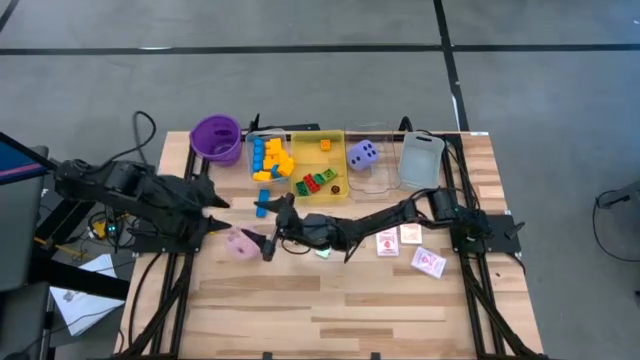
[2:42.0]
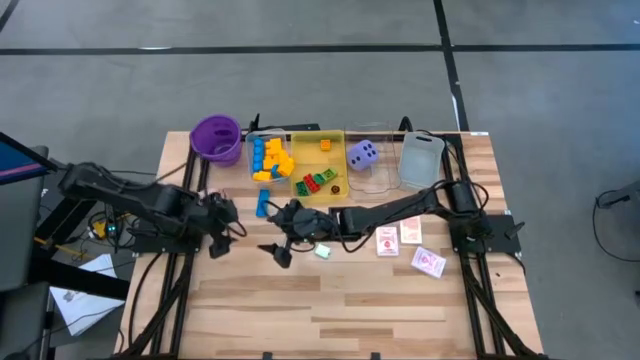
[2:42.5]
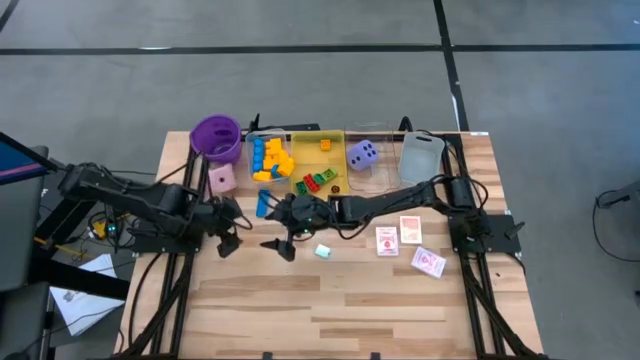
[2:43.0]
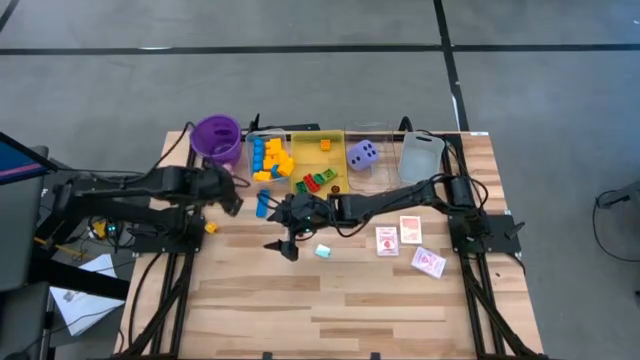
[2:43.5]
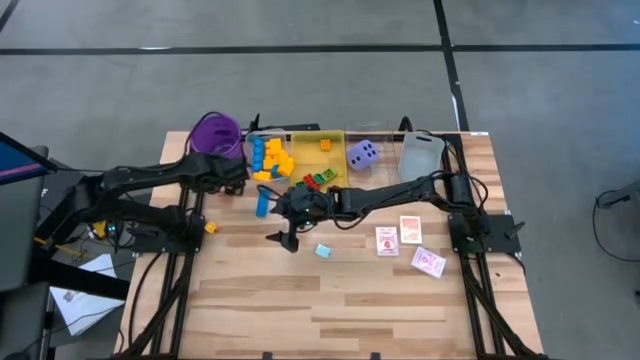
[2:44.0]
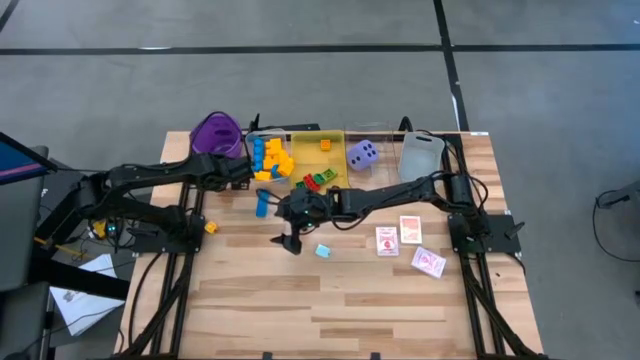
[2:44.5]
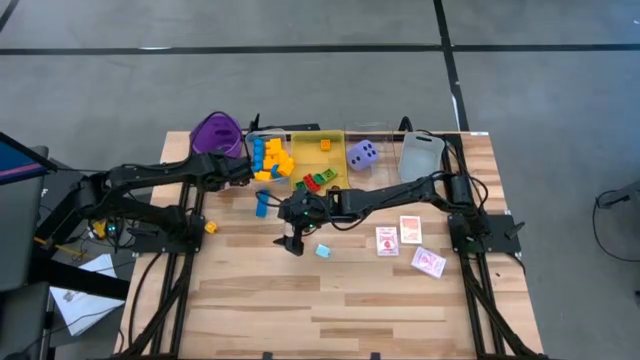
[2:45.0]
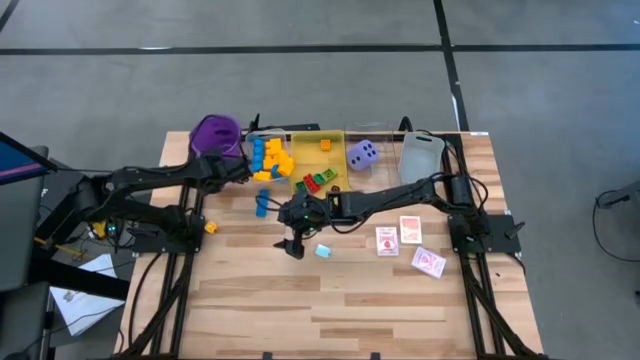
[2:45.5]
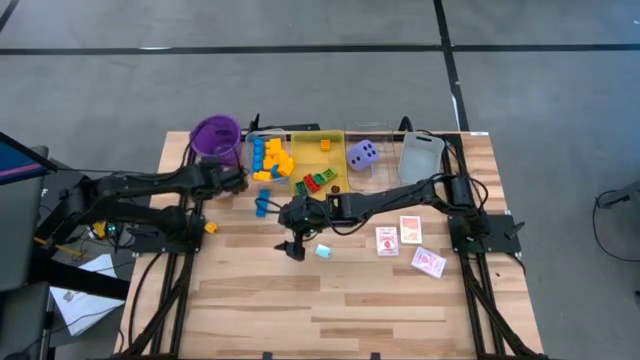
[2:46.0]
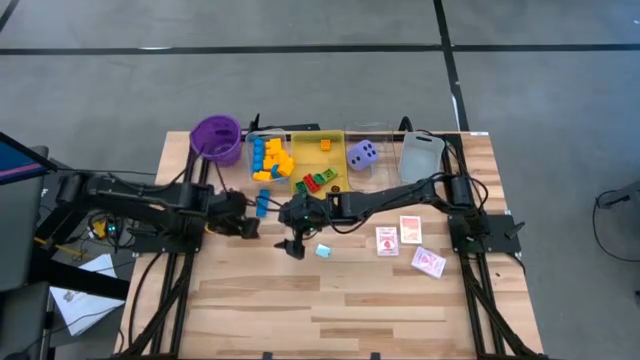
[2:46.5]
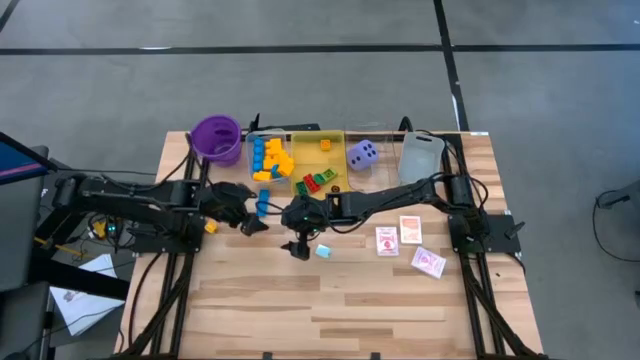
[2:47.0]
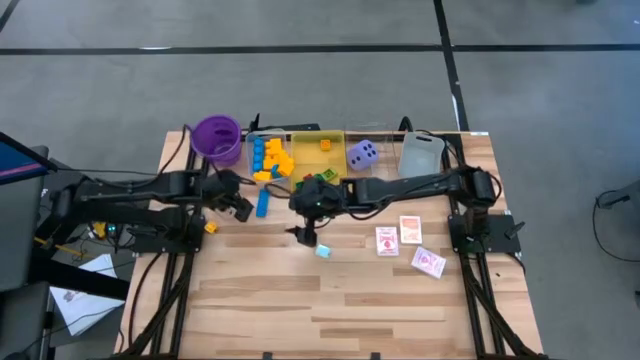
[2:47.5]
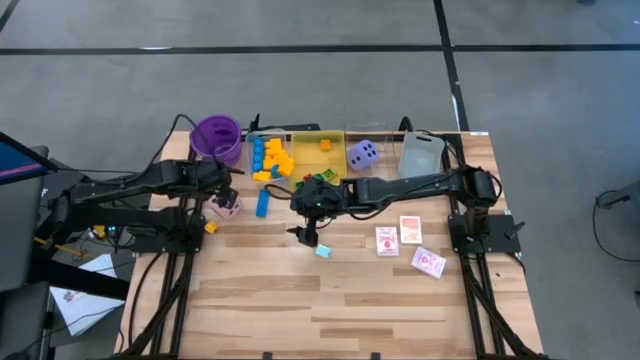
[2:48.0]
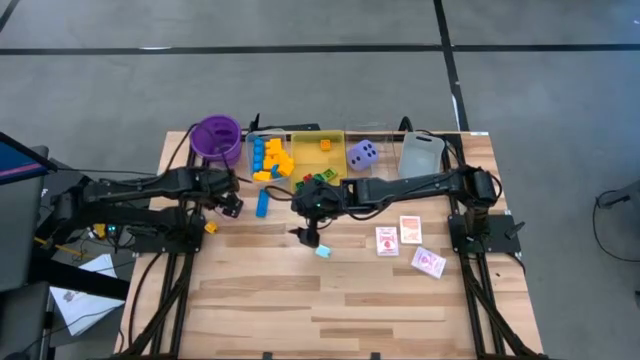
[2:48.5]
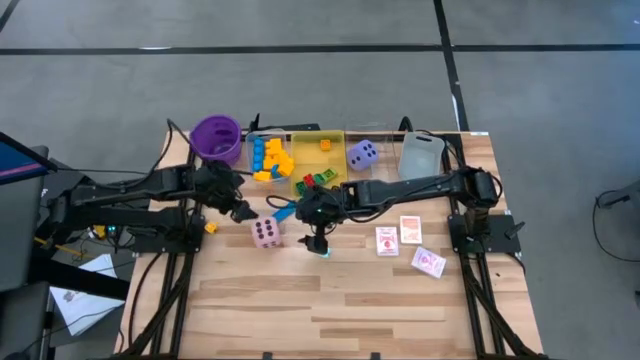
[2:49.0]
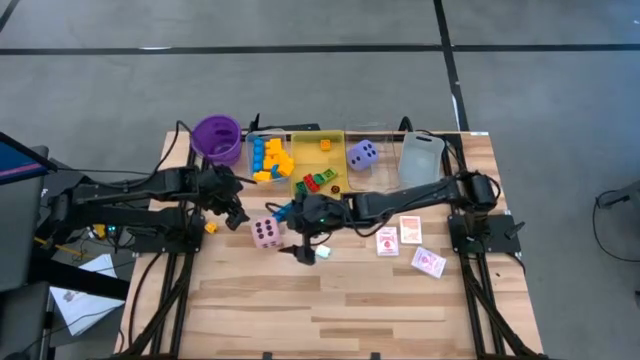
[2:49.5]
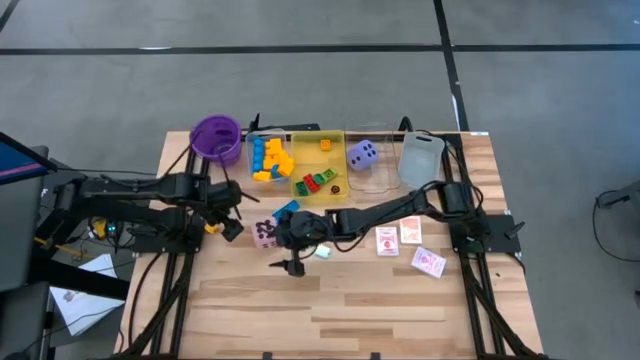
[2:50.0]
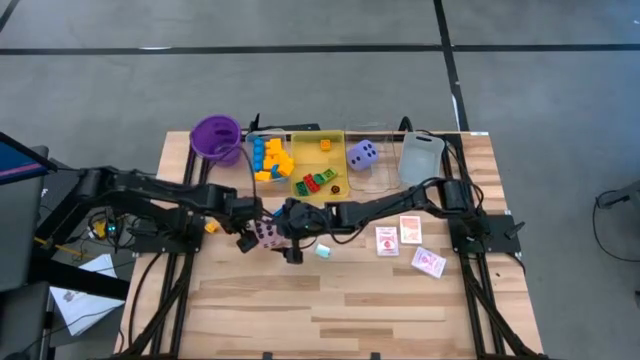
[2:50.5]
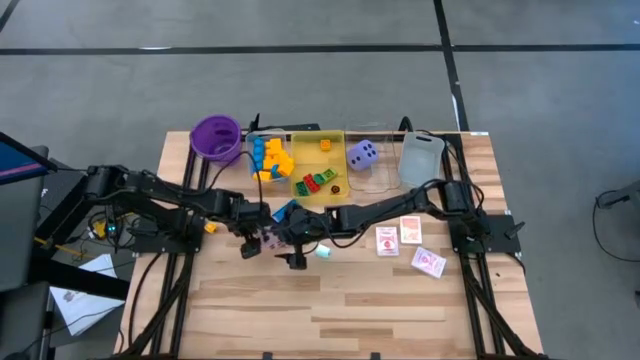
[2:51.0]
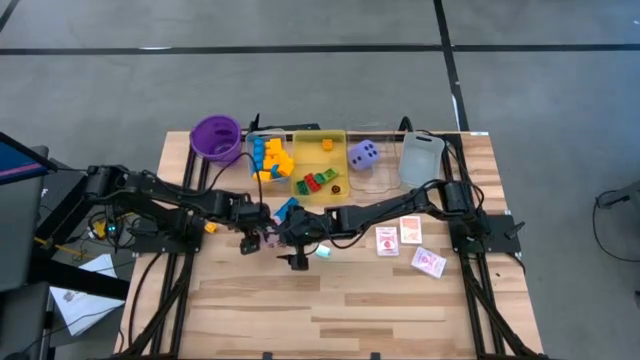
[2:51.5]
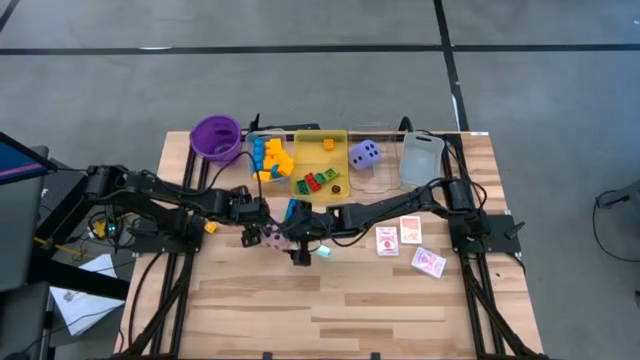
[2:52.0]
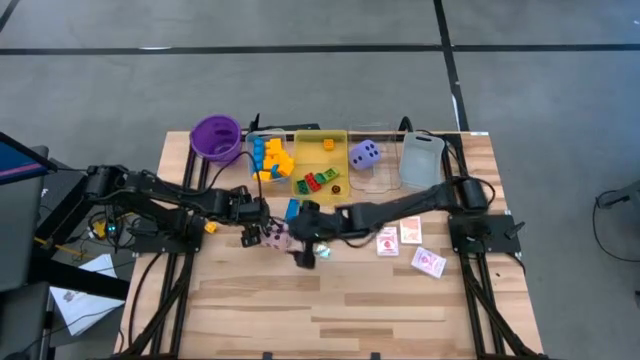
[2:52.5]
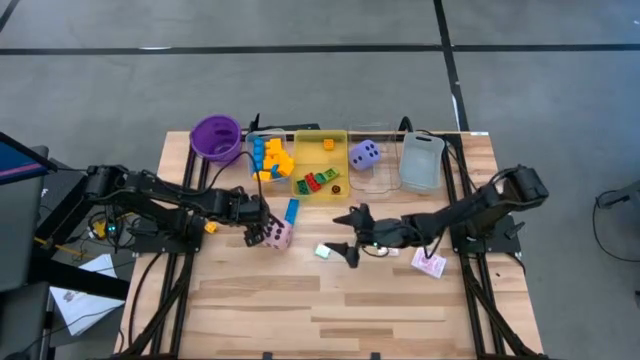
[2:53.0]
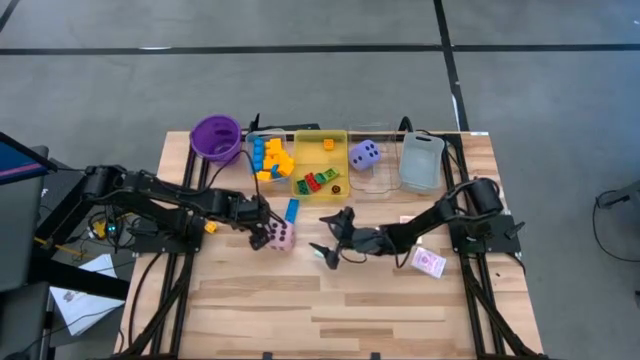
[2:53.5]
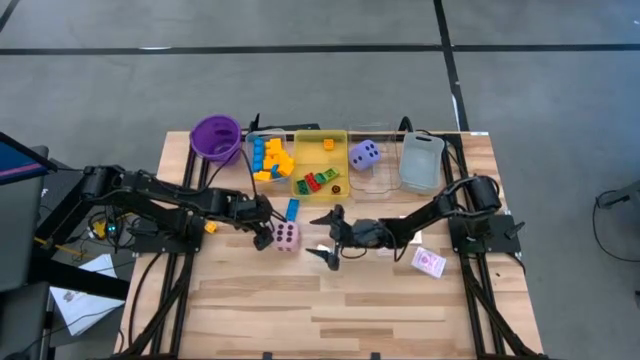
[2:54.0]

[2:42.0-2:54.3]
Task: Pick & Place Toys
Put the pink dice into the right transparent bin

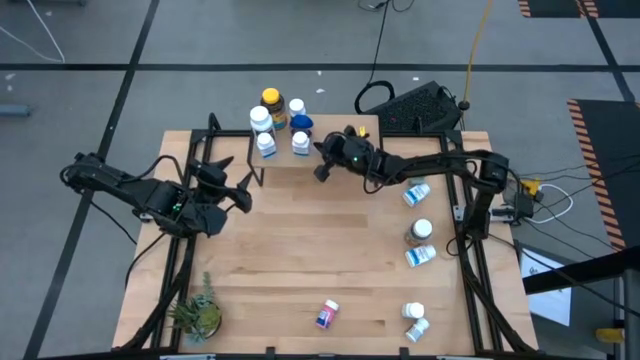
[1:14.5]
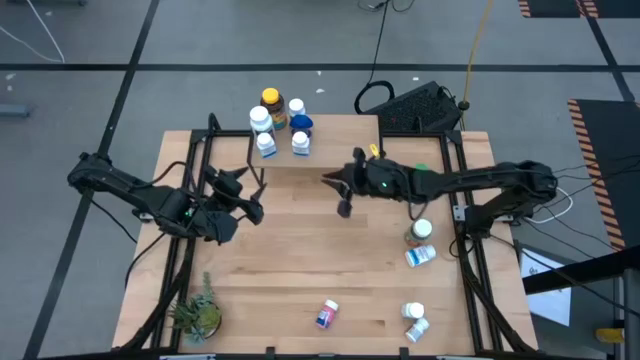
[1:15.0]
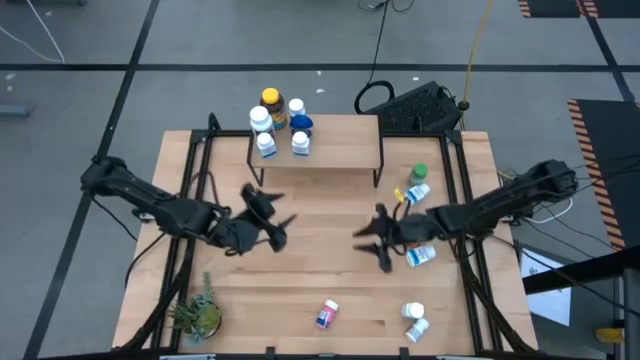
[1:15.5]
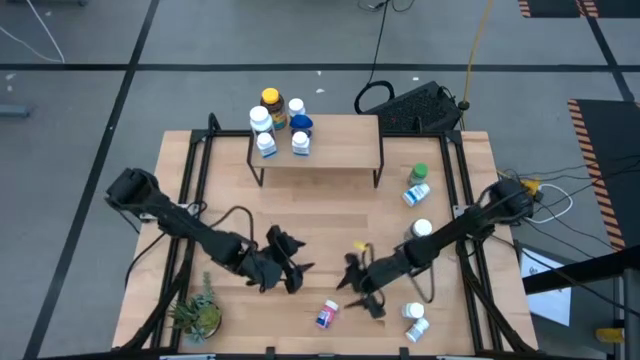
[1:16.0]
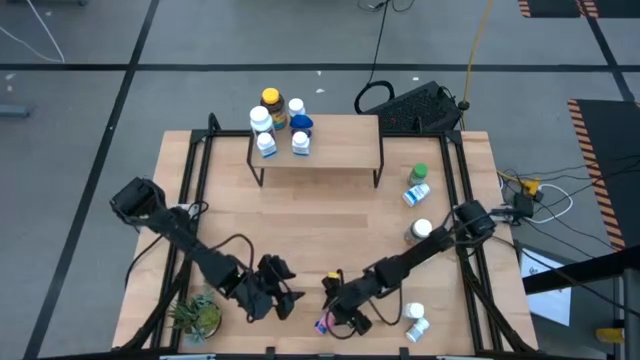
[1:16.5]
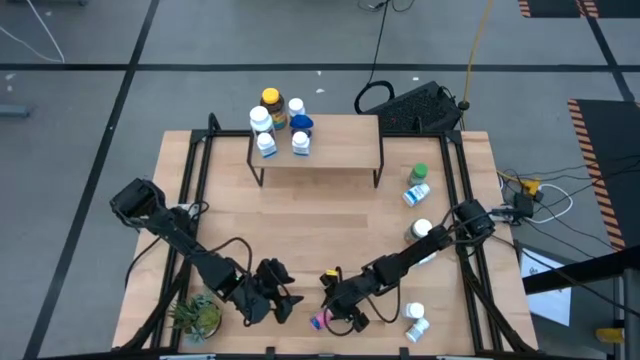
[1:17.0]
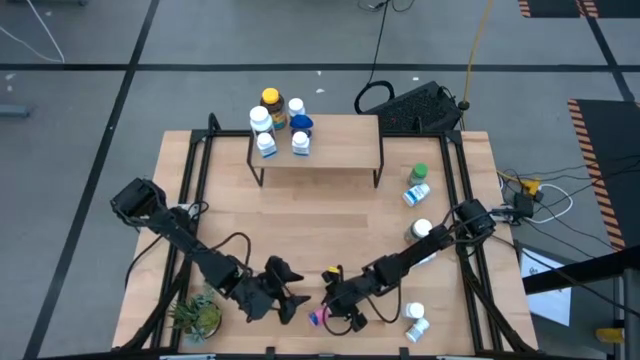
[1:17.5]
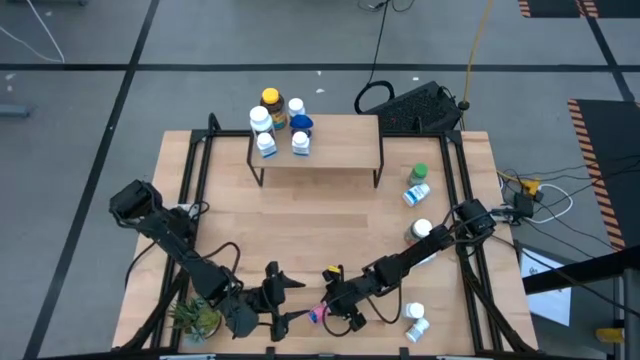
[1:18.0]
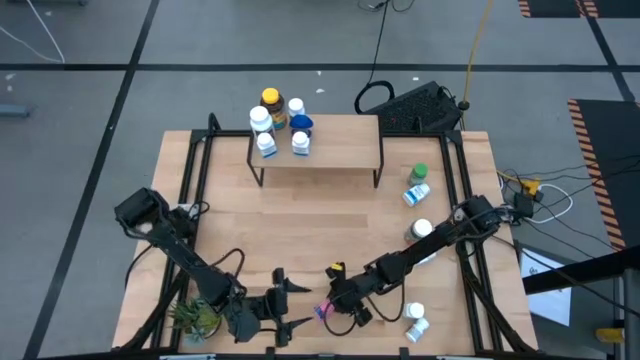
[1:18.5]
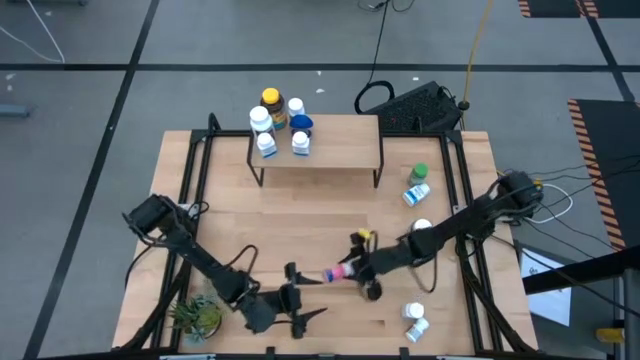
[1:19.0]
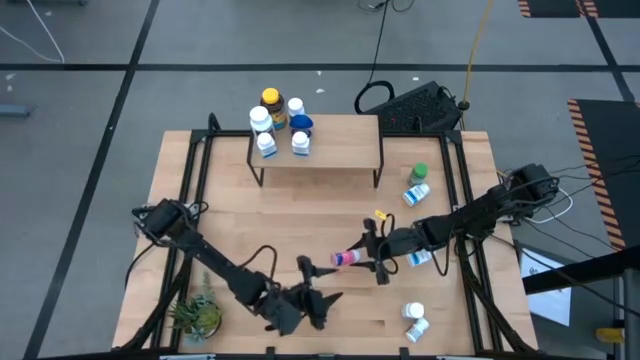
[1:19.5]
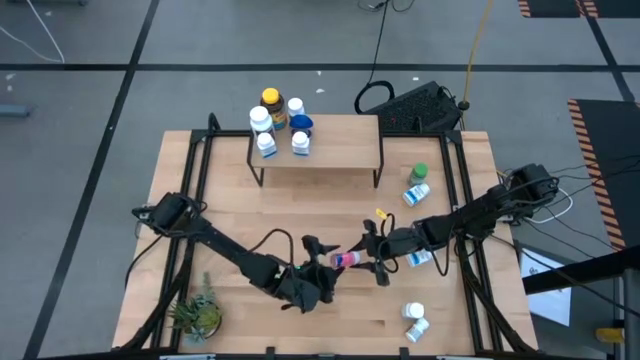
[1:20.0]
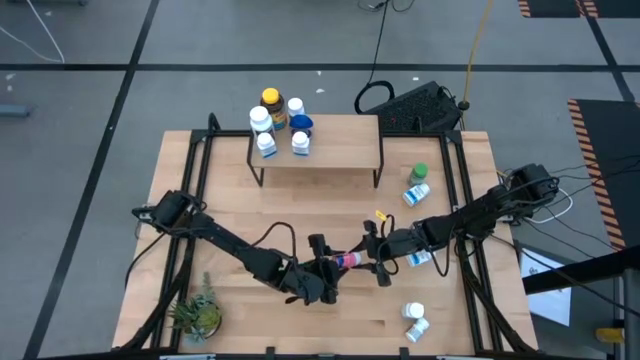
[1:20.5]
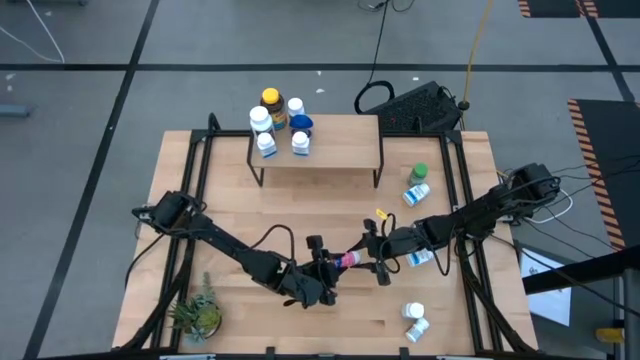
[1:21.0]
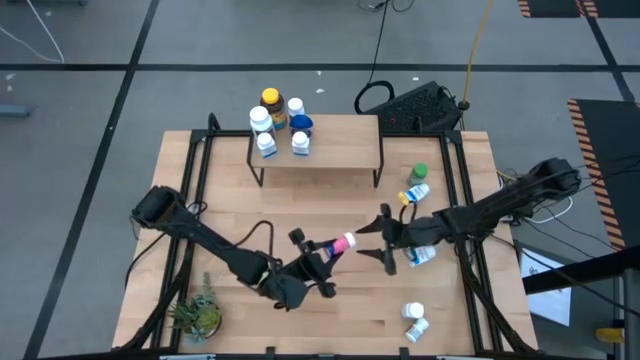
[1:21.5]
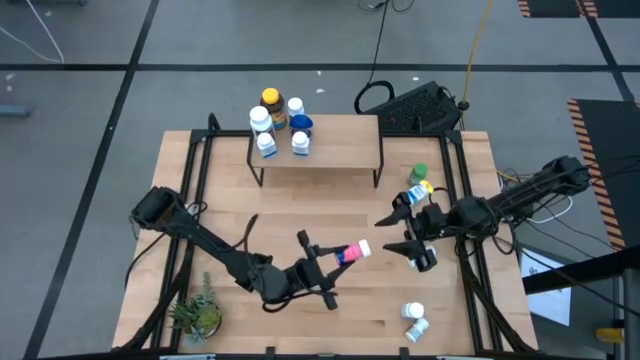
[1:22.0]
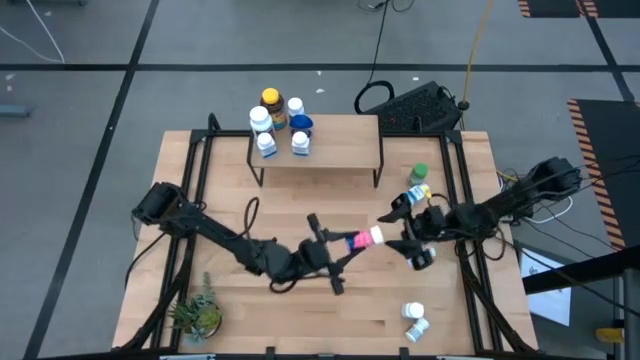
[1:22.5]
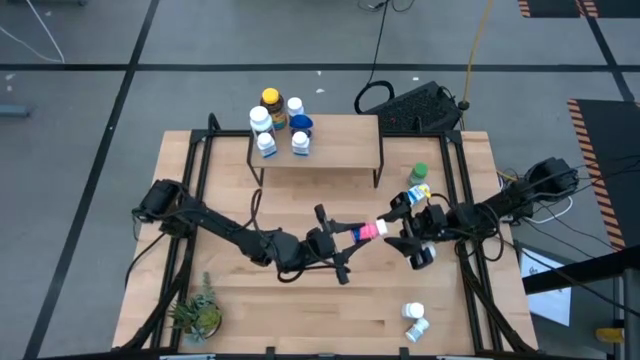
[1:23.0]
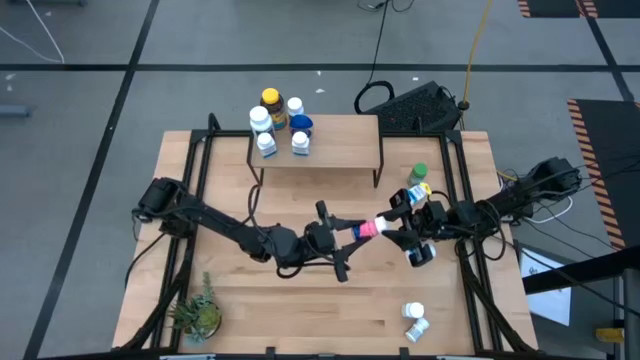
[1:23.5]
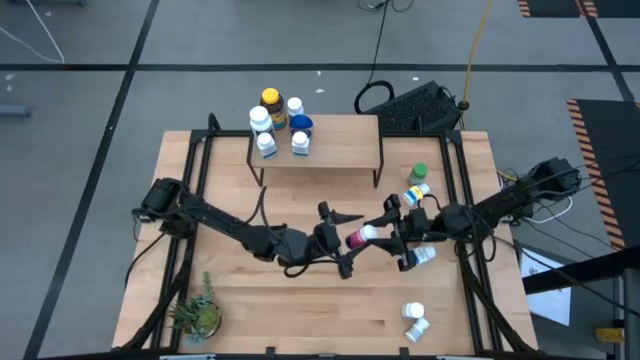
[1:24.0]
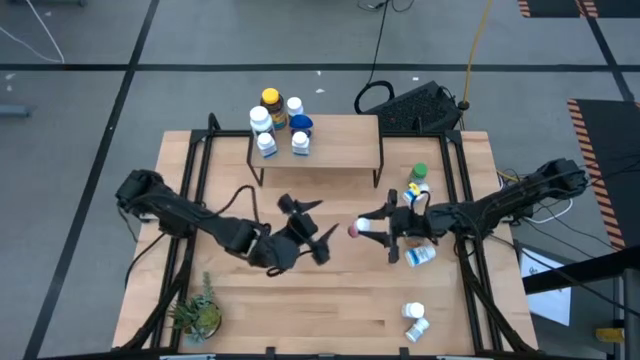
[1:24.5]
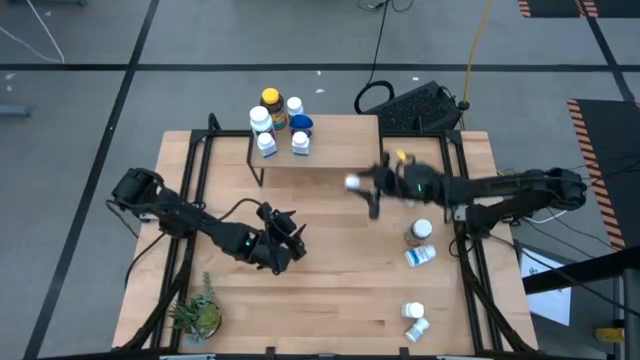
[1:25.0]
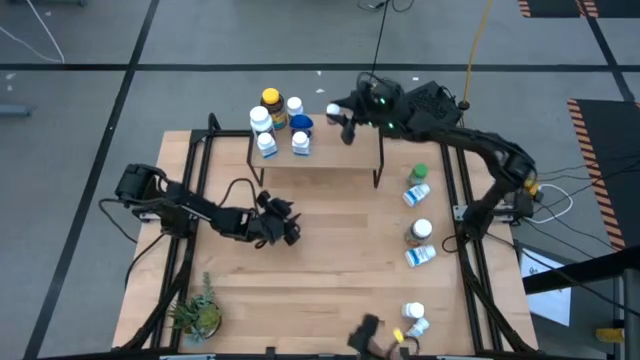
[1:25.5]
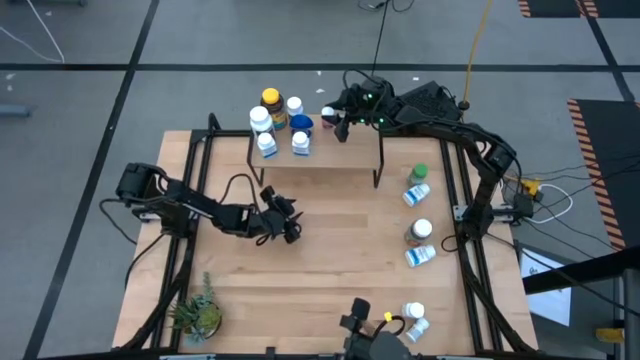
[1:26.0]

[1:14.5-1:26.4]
Task: Pick and place medicine bottles onto shelf by color
Put the pink medicine bottle on the shelf
